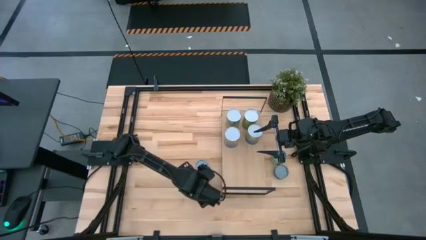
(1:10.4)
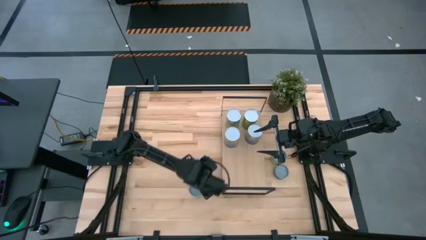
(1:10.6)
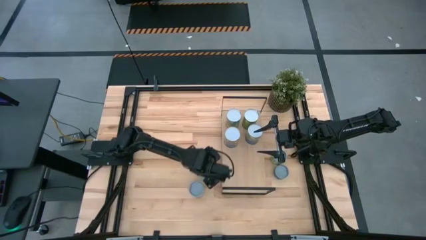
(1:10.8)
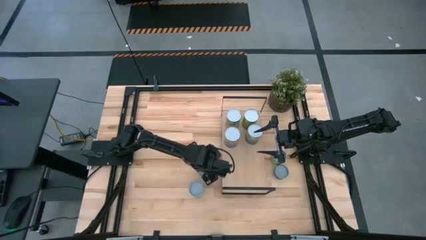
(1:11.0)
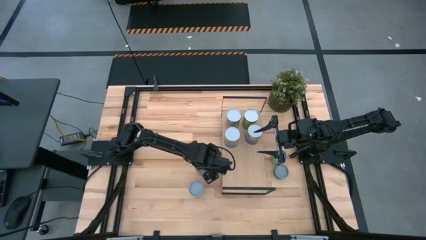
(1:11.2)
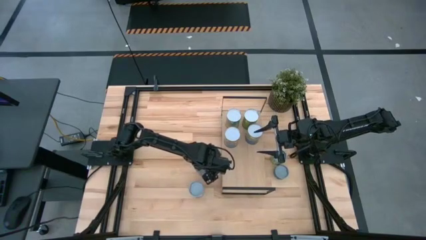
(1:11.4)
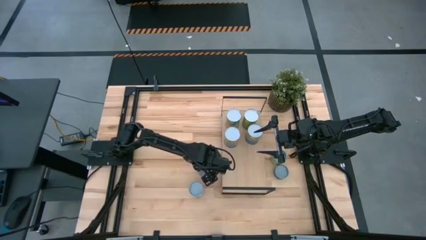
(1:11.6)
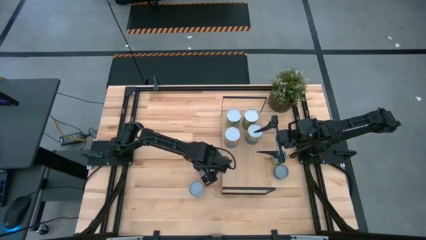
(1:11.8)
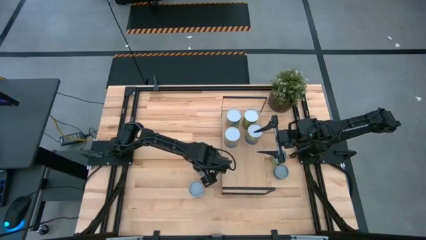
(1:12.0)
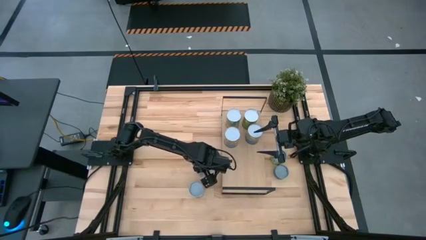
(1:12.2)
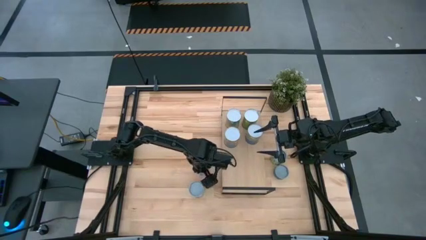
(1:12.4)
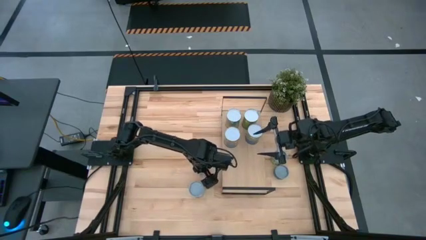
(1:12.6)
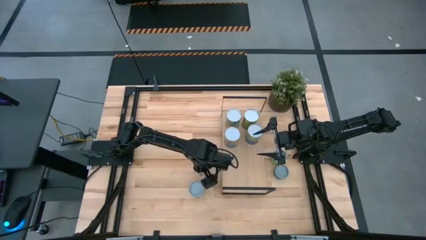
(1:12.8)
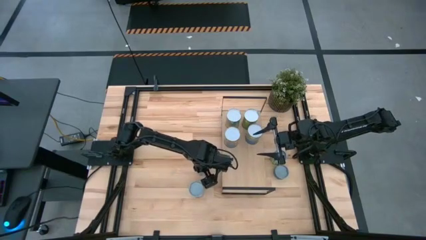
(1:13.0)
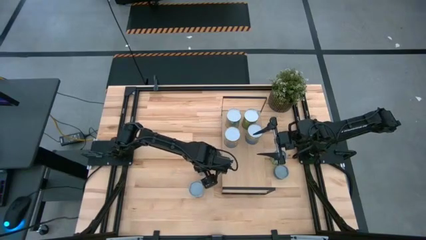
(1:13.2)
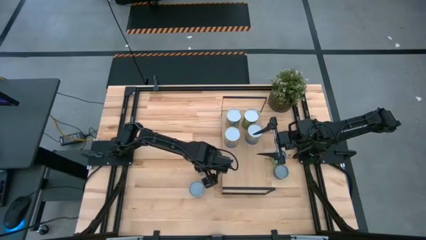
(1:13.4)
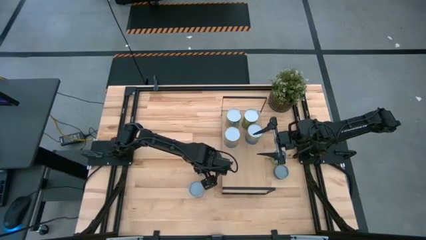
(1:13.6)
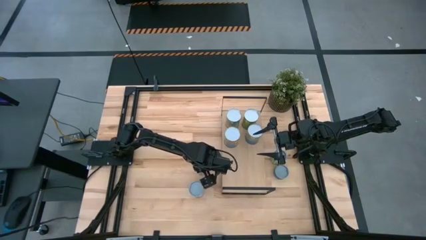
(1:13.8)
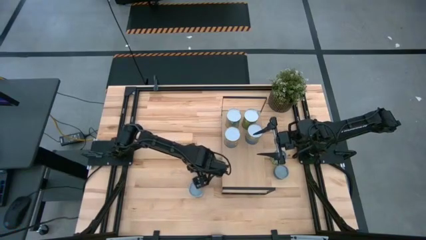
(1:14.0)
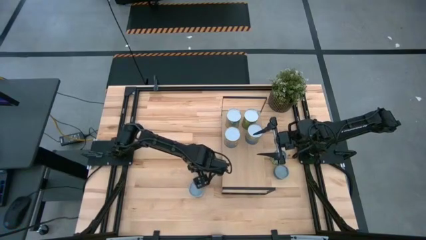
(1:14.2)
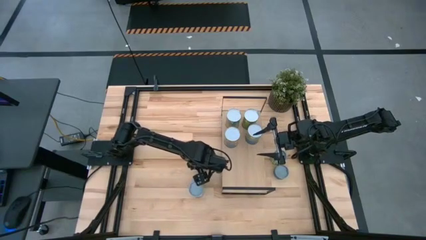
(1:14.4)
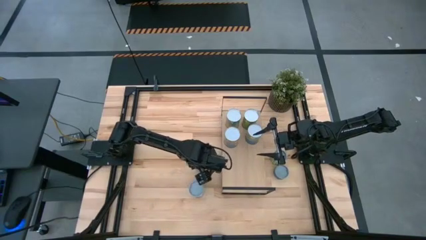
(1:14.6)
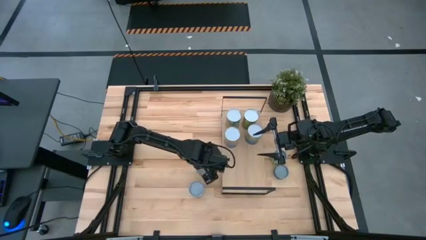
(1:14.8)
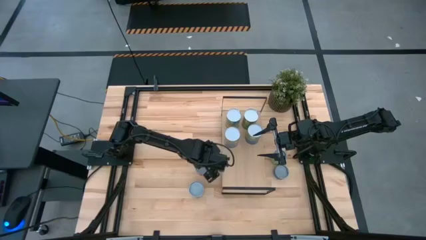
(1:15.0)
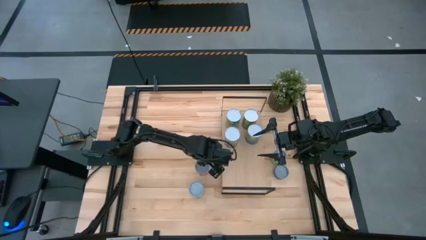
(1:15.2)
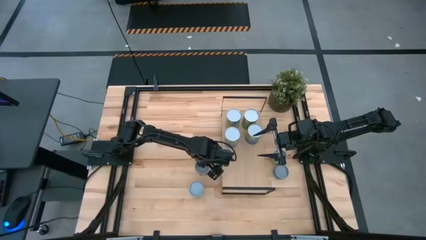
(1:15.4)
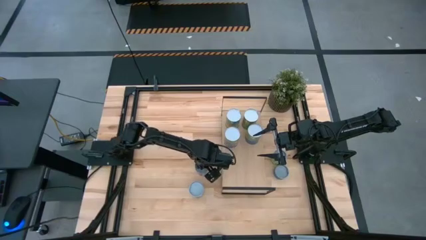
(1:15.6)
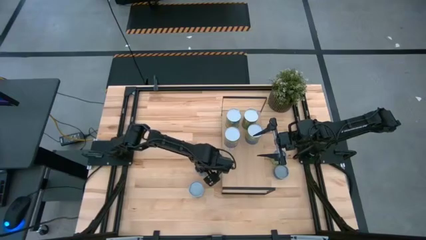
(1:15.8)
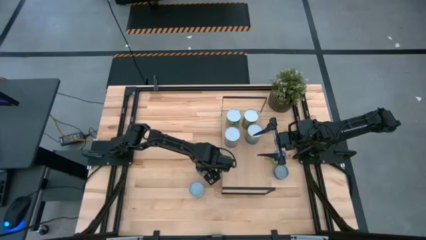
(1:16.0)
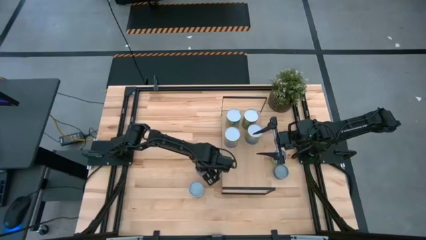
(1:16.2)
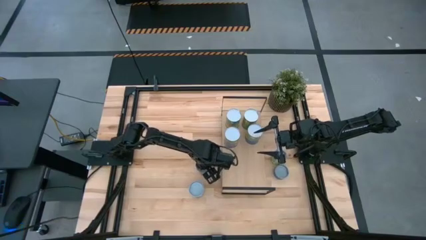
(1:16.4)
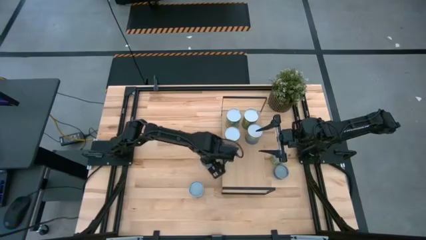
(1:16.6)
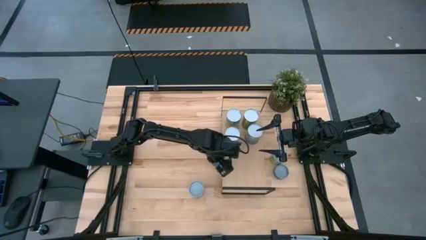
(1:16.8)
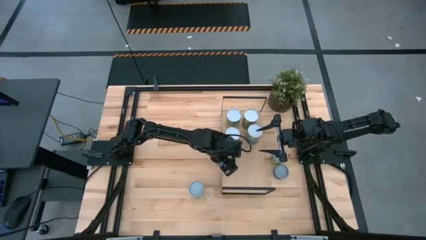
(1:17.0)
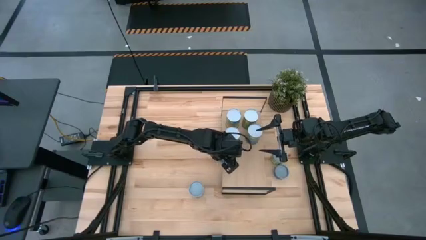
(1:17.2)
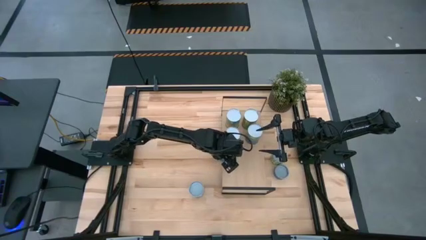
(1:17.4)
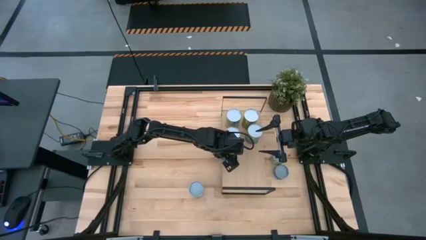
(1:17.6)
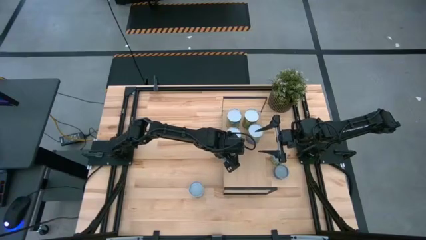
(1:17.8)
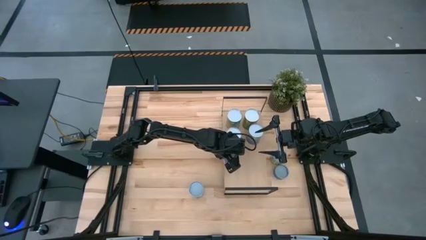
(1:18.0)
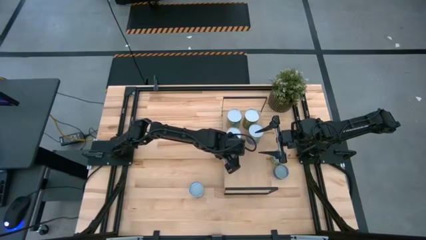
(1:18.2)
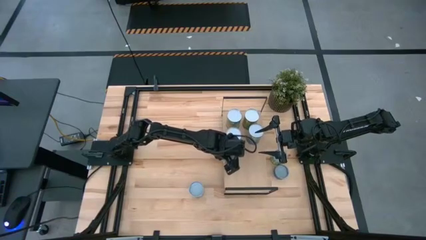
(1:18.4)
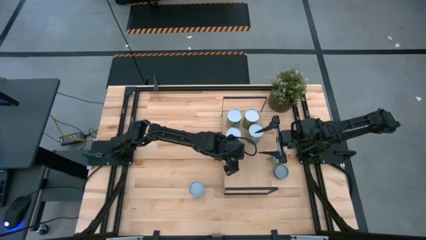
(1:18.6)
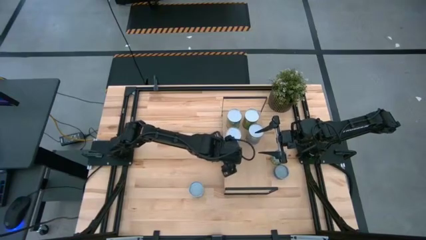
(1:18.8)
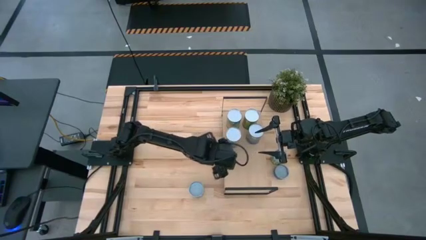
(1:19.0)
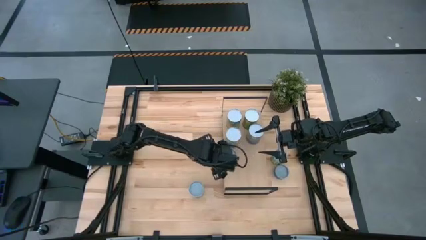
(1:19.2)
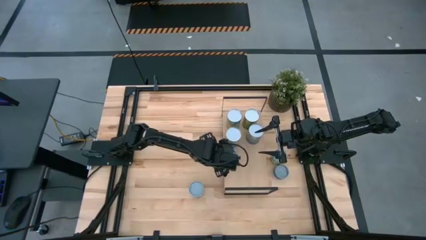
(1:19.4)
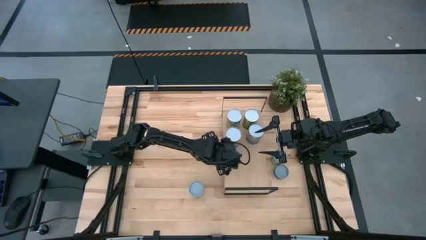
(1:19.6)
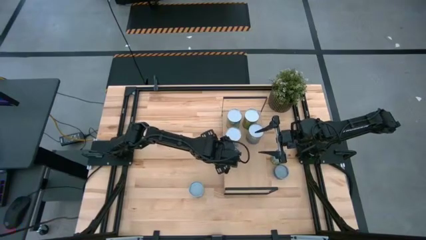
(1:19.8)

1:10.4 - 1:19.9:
Task: Pick and place cans onto a shelf
Put the canned tomatoes on the shelf

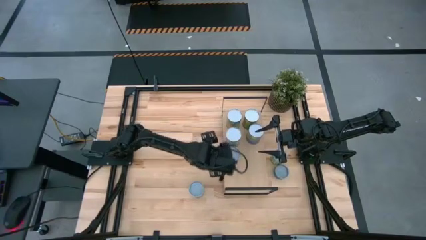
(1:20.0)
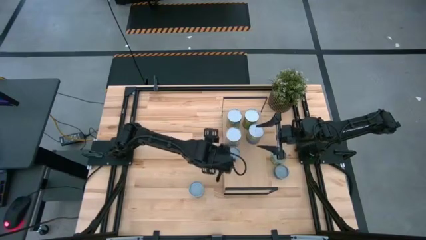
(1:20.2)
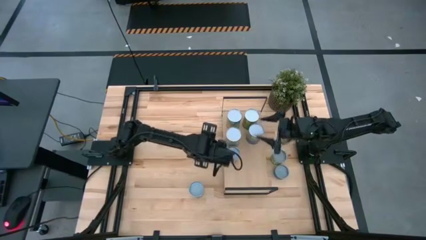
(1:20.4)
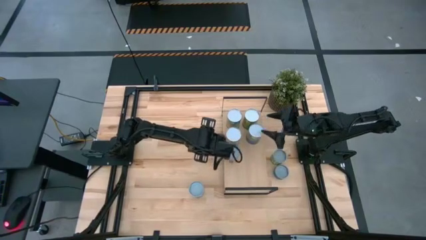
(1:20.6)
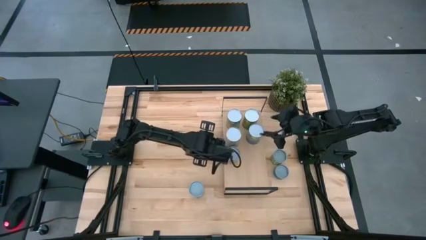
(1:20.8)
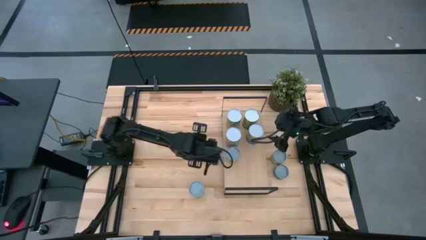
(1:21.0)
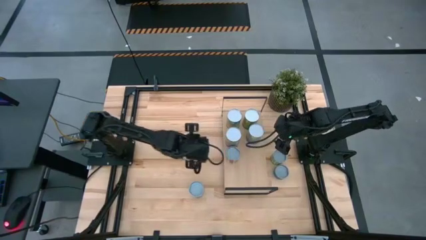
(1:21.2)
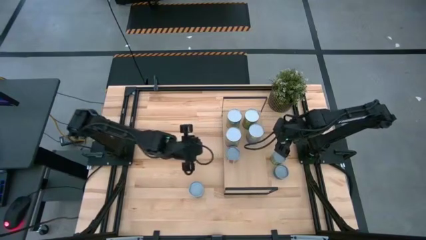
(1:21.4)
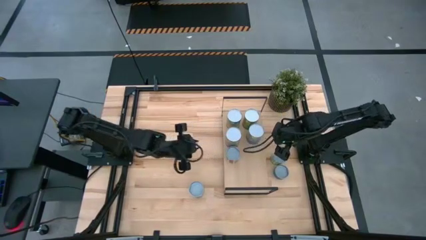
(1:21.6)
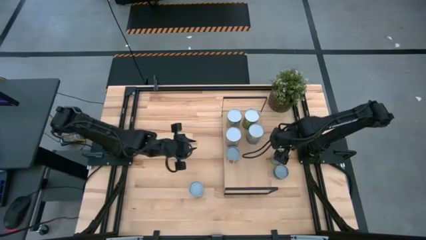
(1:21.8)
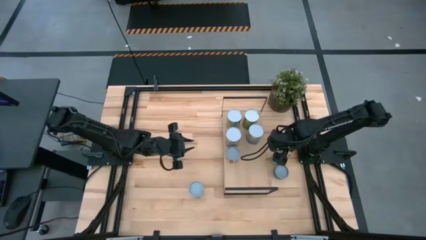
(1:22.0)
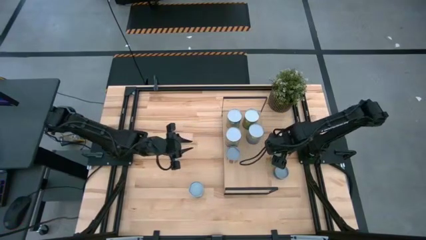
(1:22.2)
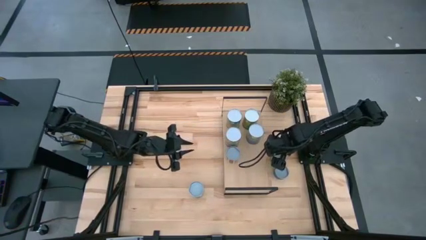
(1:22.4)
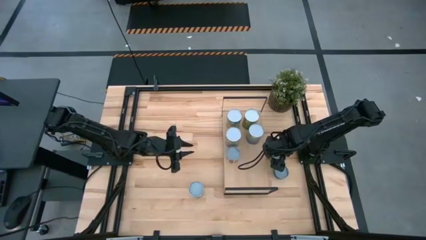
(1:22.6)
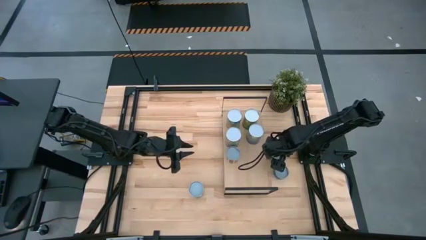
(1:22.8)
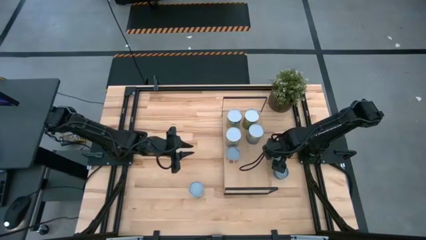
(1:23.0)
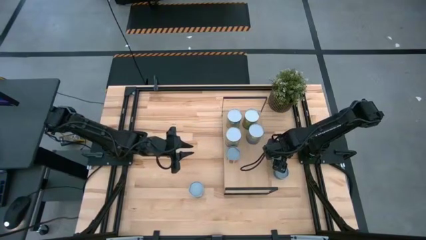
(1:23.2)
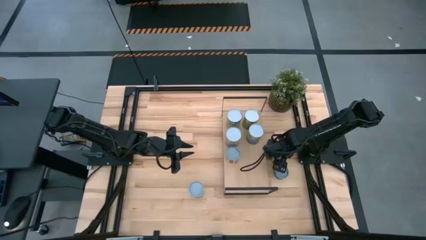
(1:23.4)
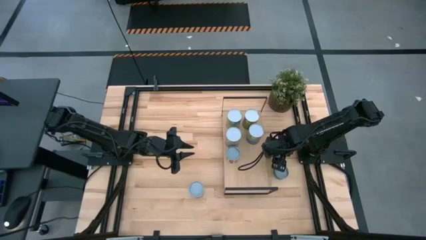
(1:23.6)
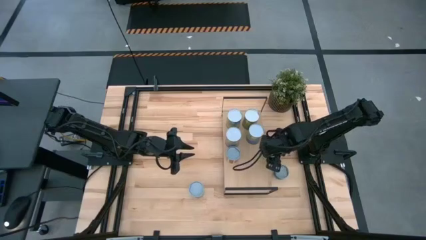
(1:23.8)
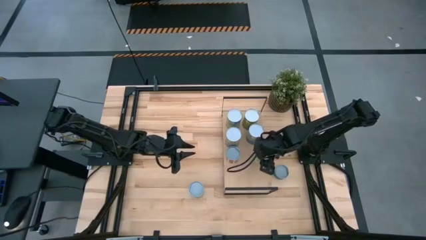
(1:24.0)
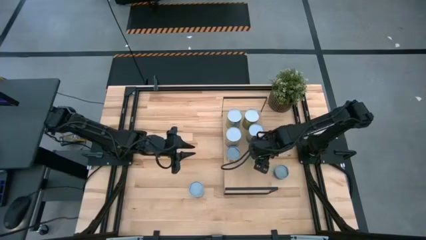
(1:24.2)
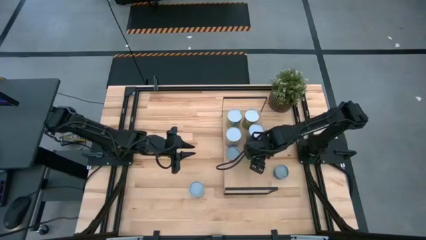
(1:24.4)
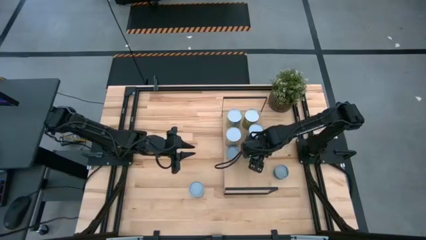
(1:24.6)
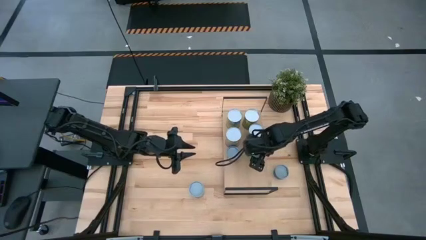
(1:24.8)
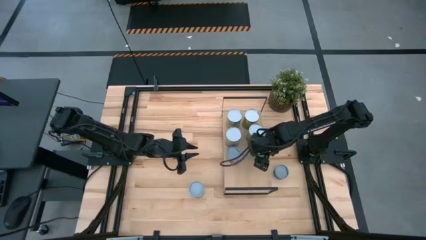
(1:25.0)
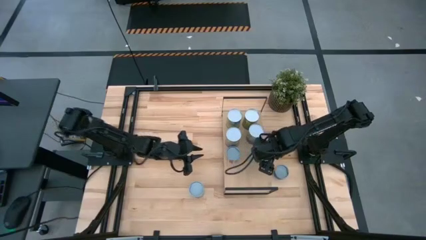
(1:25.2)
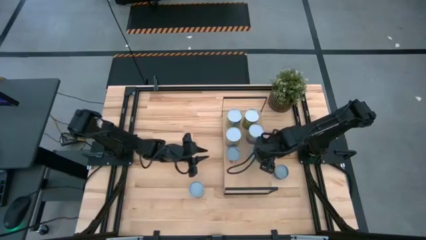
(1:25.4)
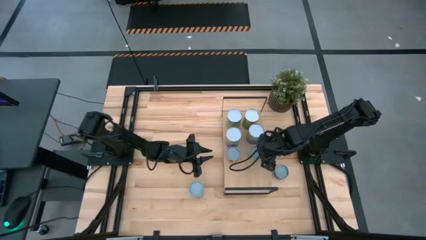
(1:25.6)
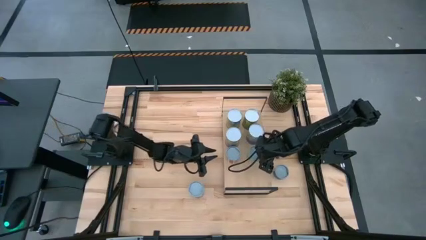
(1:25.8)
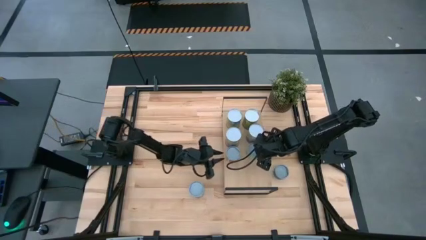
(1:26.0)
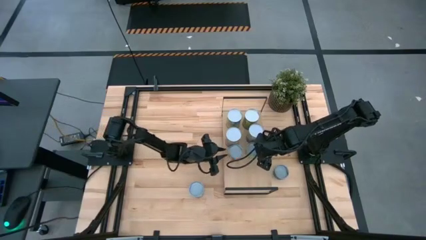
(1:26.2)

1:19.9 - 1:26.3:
Put the small canned peas on the shelf
